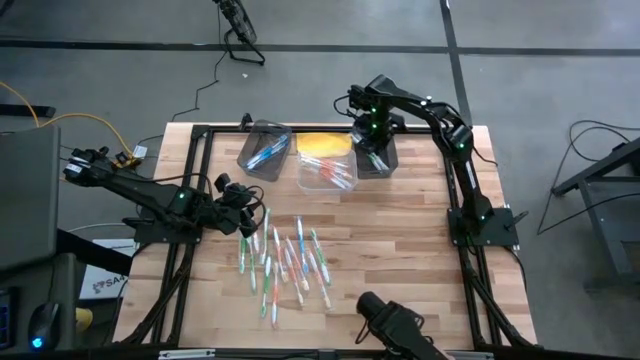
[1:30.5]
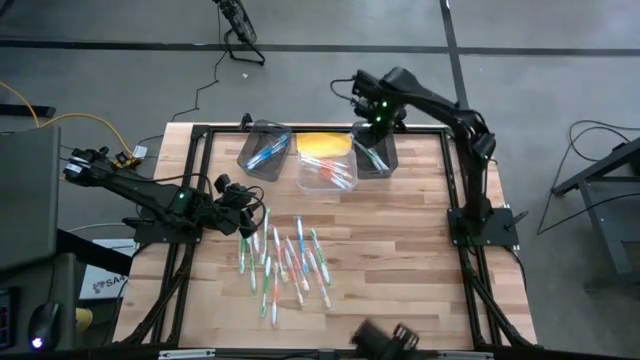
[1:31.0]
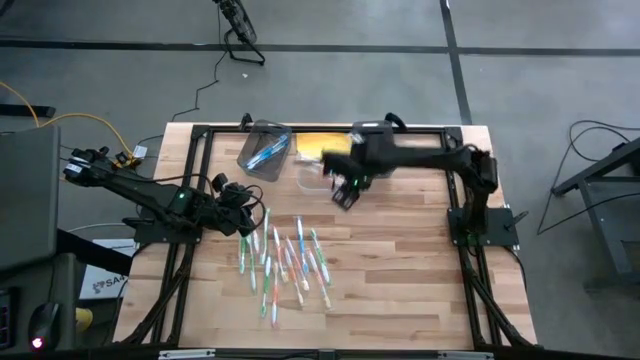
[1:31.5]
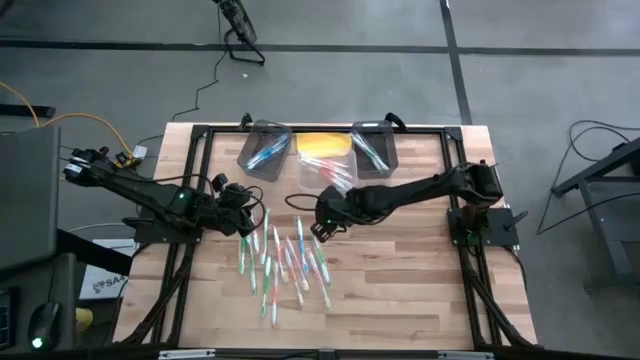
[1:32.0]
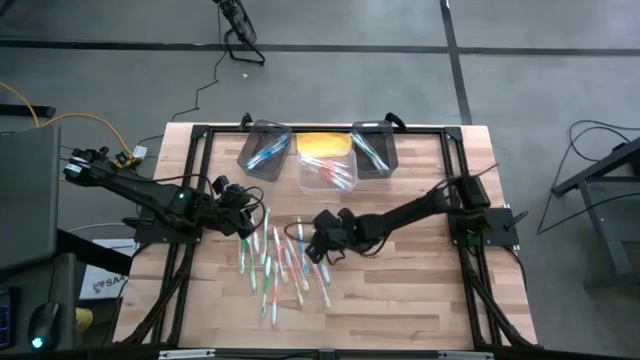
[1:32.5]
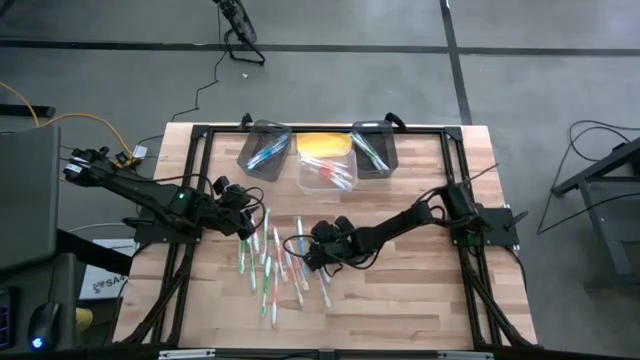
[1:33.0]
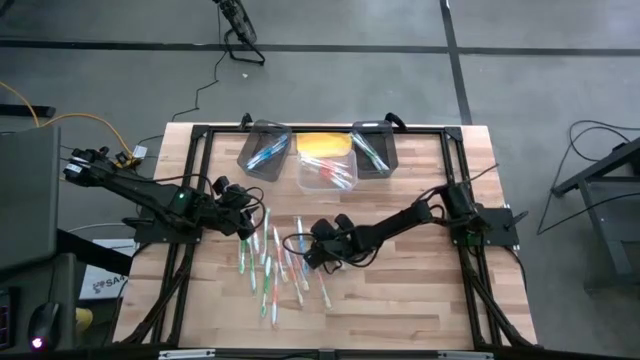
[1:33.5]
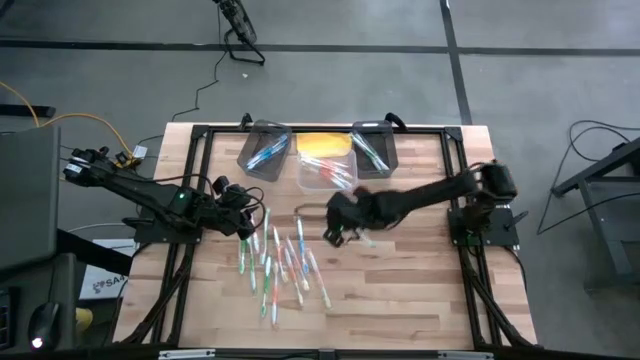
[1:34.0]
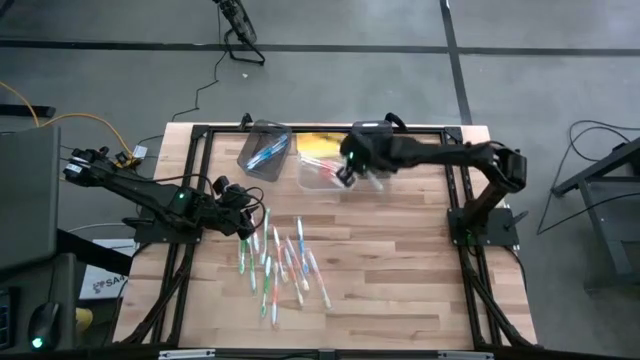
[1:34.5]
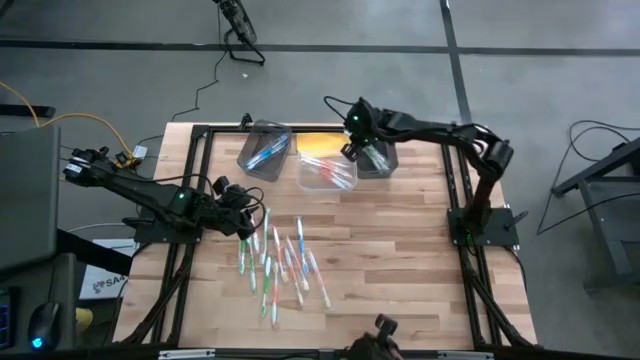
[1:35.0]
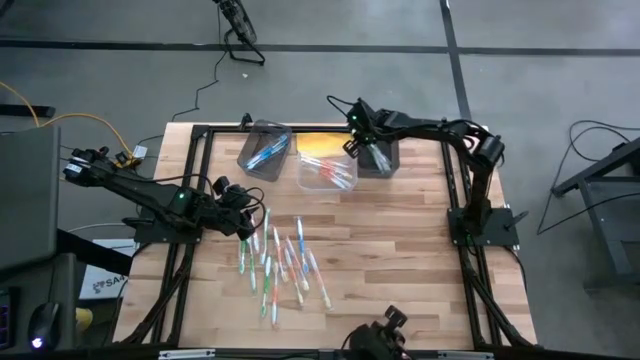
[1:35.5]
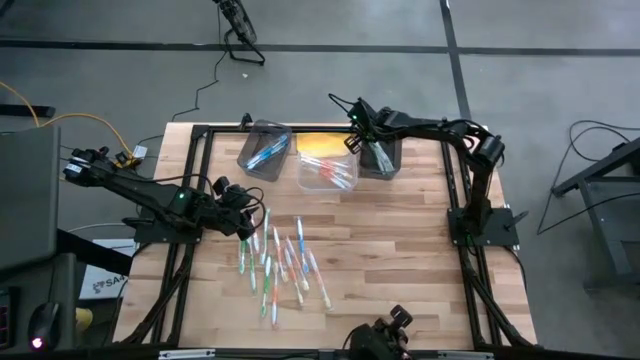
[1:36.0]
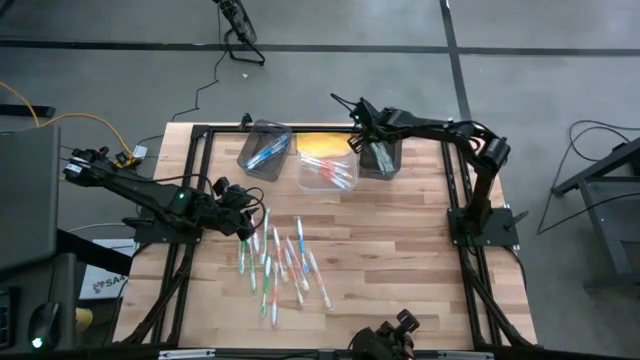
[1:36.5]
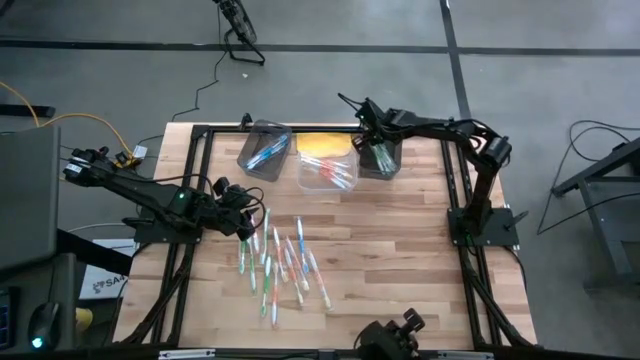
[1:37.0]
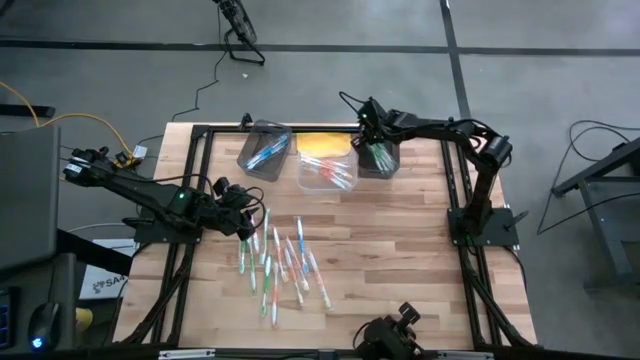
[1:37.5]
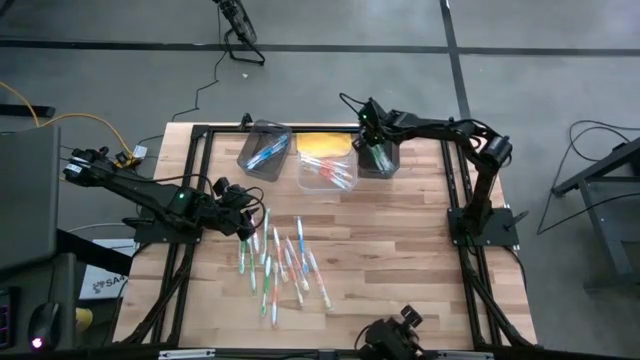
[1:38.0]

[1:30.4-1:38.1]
Task: Pick & Place Toothbrushes
Put the green toothbrush into the right black bin

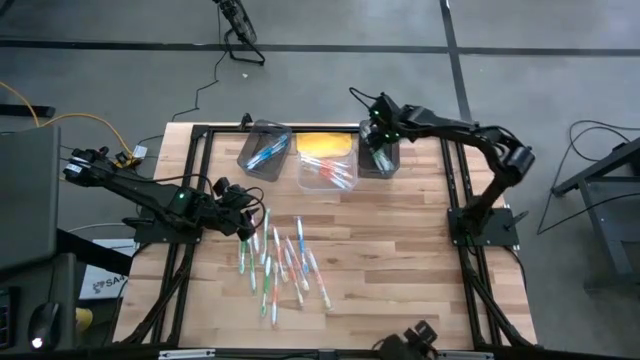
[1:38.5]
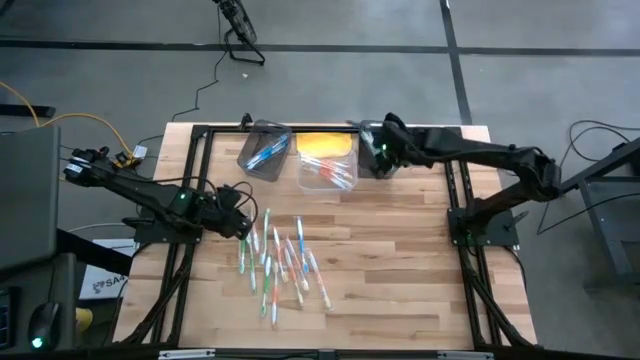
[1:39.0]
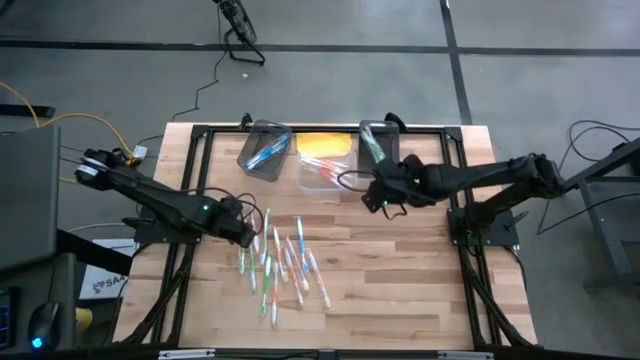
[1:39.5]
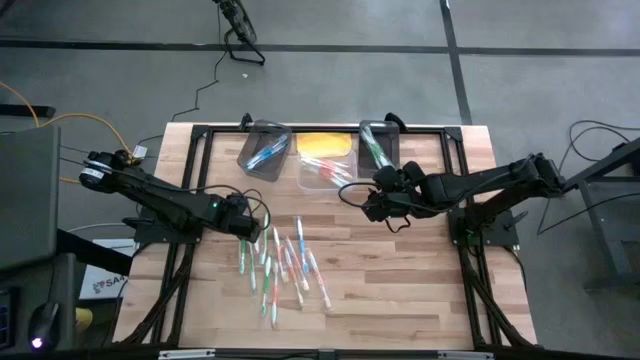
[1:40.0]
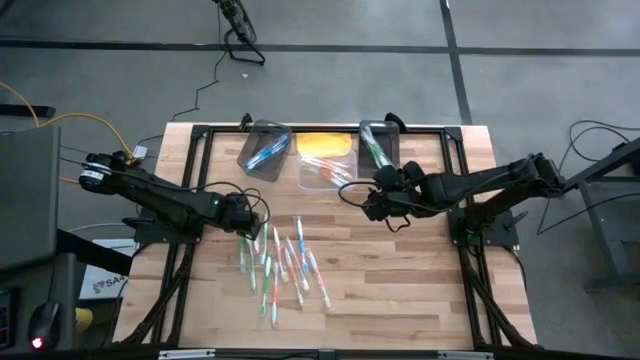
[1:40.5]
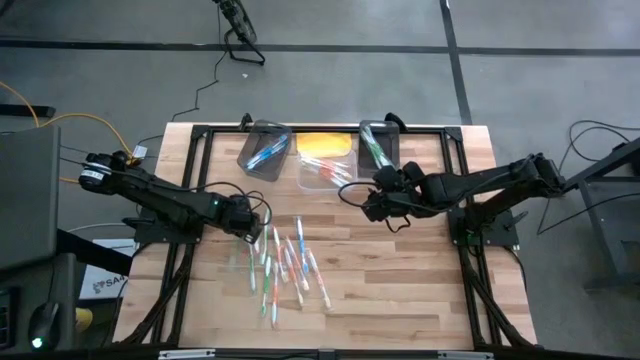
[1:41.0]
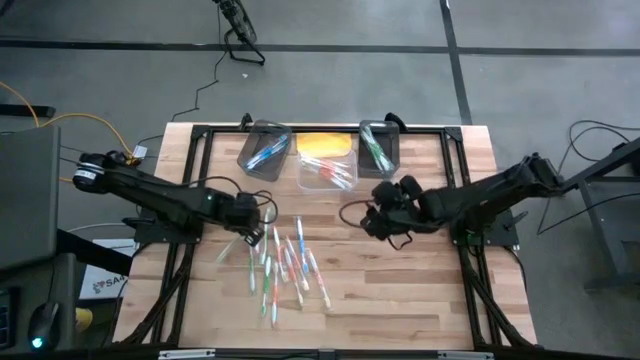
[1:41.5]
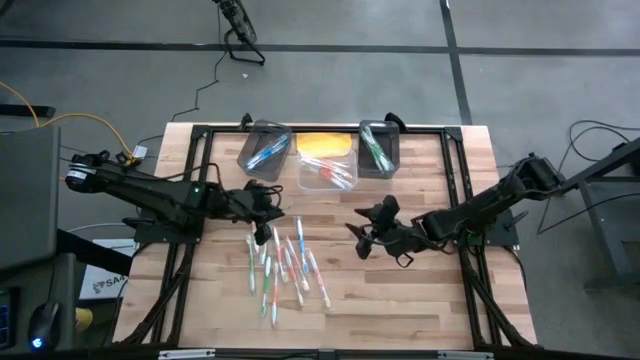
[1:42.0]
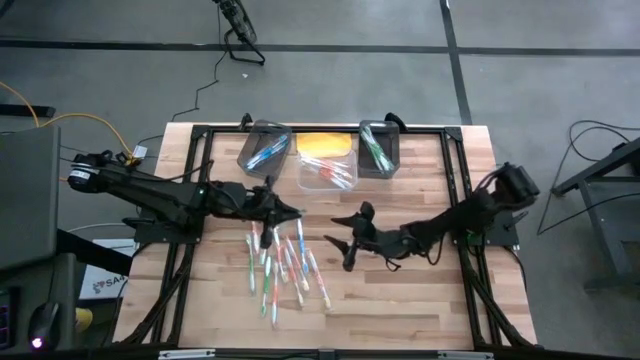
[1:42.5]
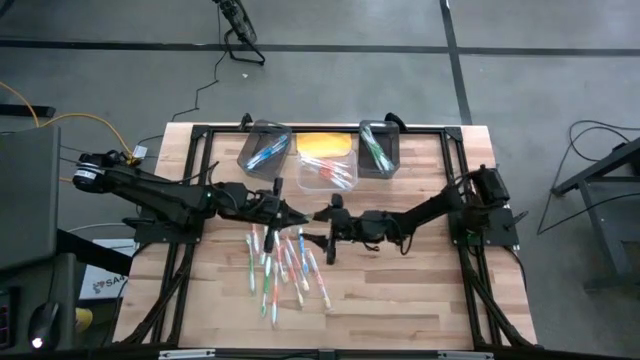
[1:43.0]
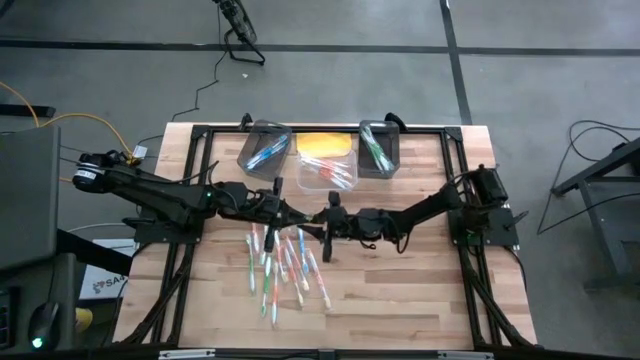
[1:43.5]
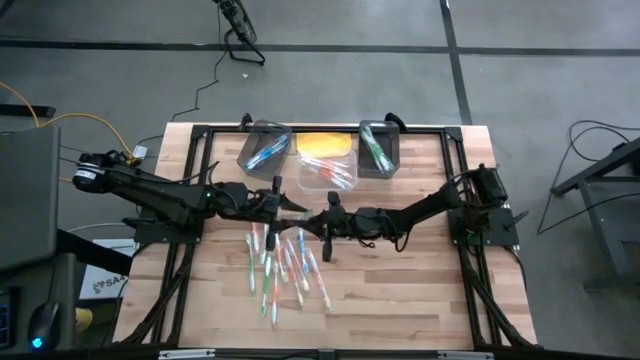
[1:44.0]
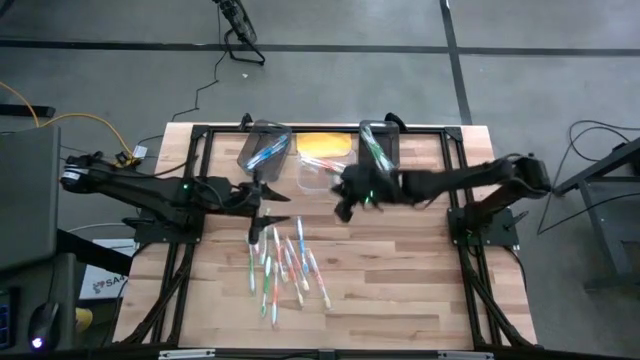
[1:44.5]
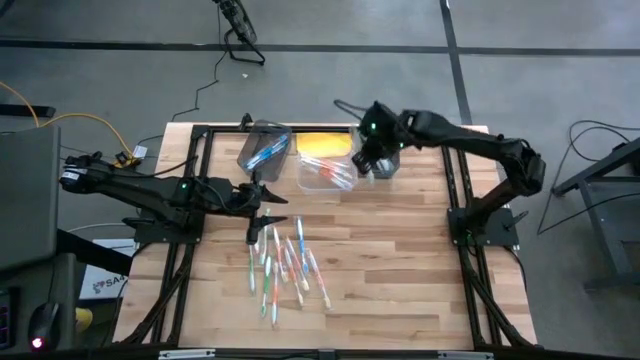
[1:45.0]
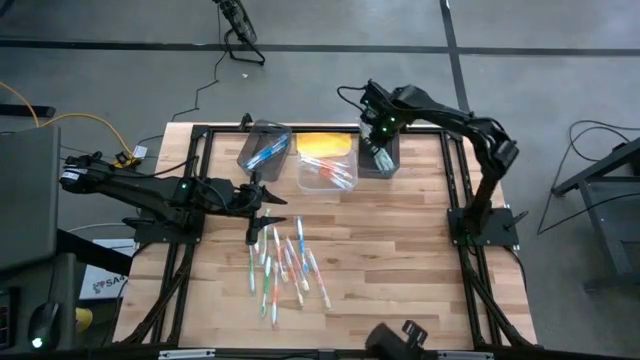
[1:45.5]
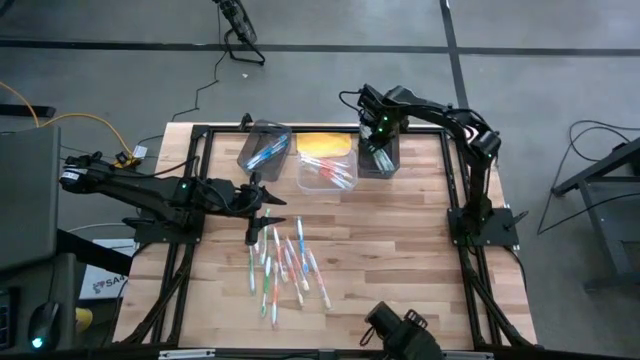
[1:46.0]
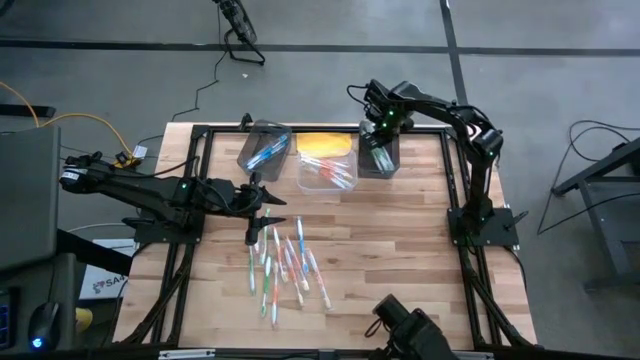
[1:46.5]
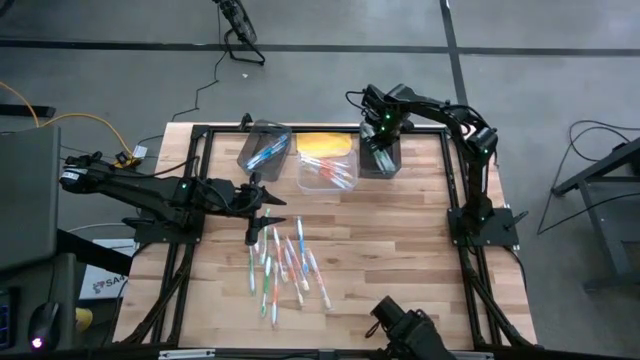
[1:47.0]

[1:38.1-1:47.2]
Put the green toothbrush into the right black bin

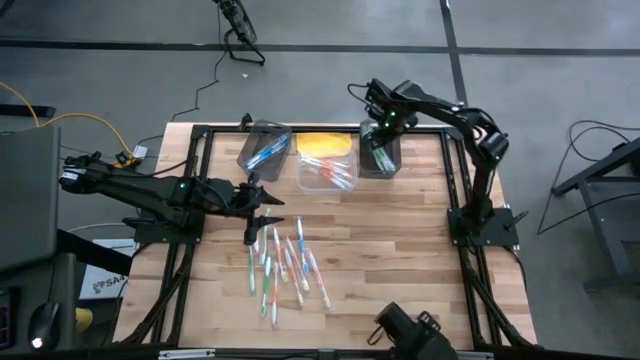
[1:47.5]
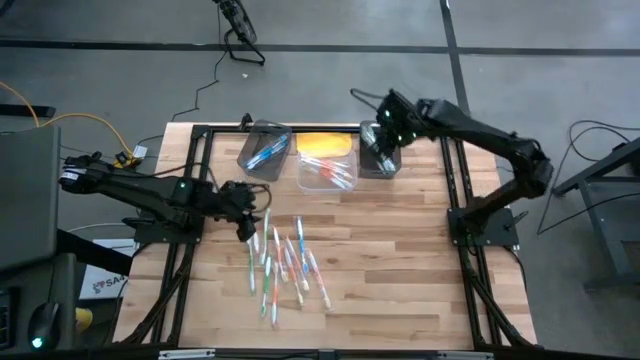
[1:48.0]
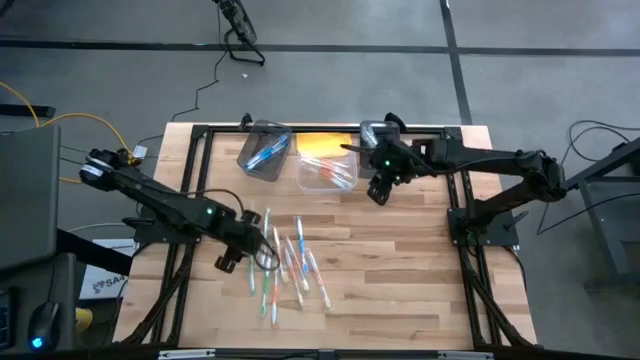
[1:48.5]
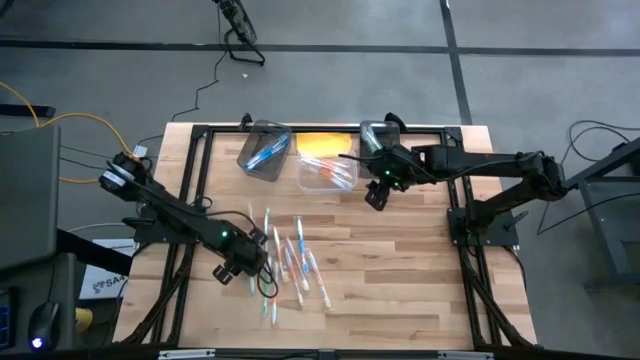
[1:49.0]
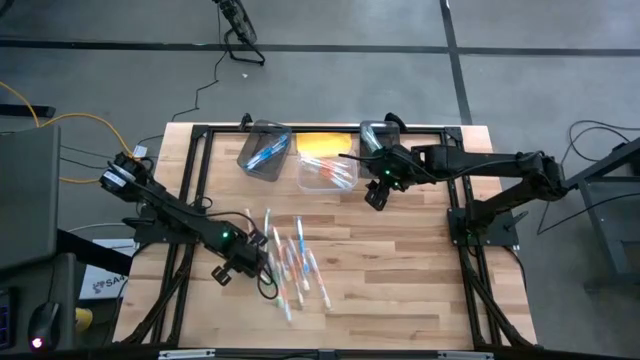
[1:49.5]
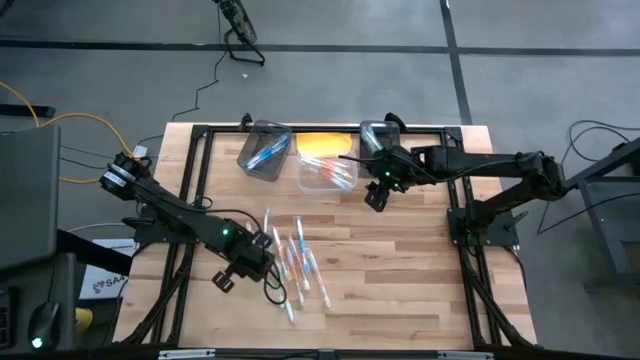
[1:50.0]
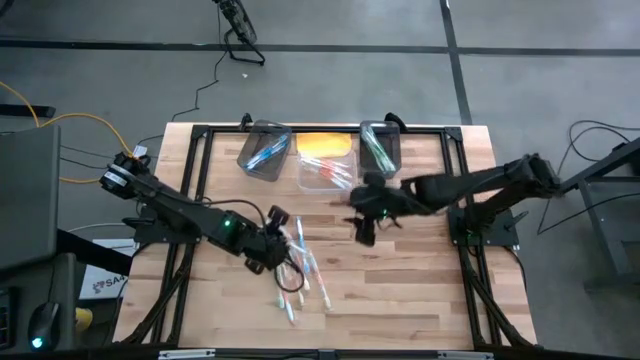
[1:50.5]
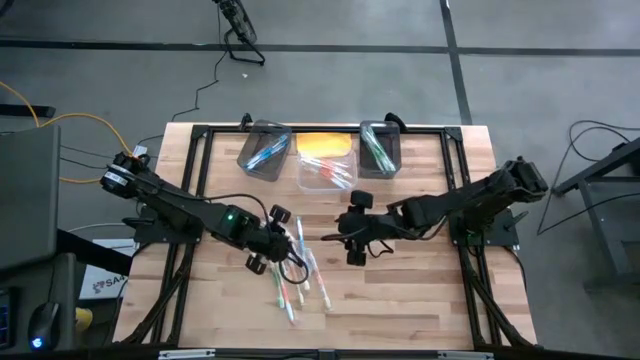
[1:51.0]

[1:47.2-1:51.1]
Put the green toothbrush into the right black bin

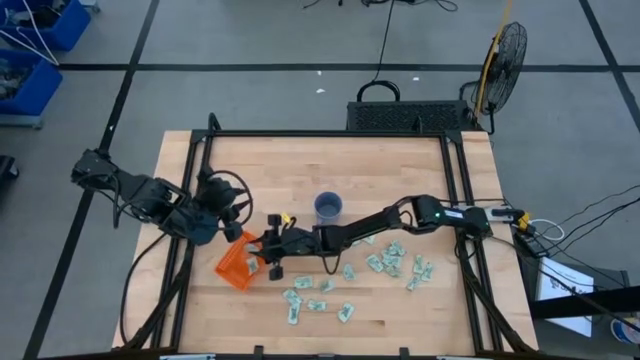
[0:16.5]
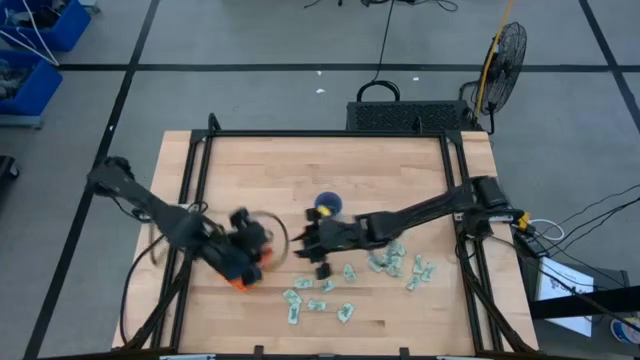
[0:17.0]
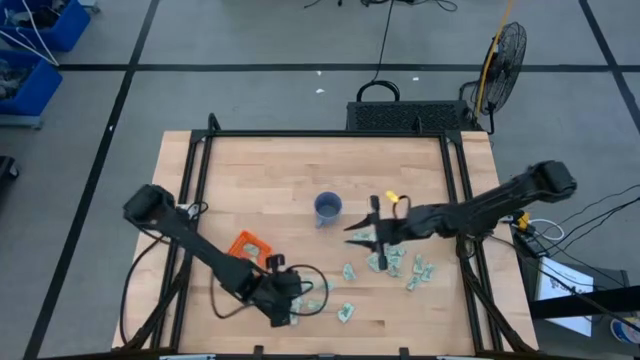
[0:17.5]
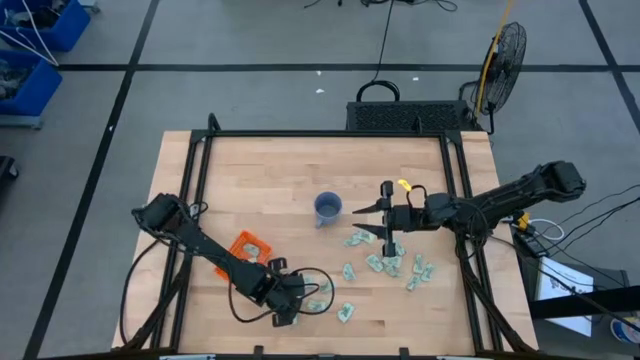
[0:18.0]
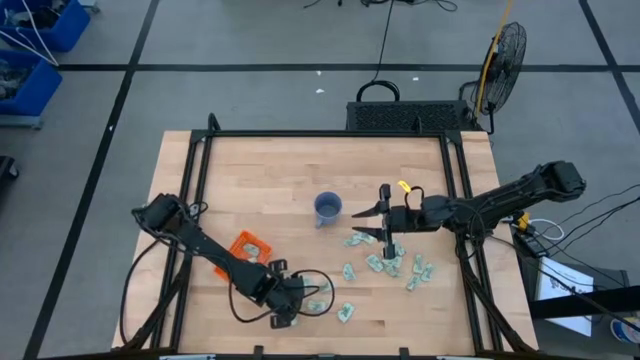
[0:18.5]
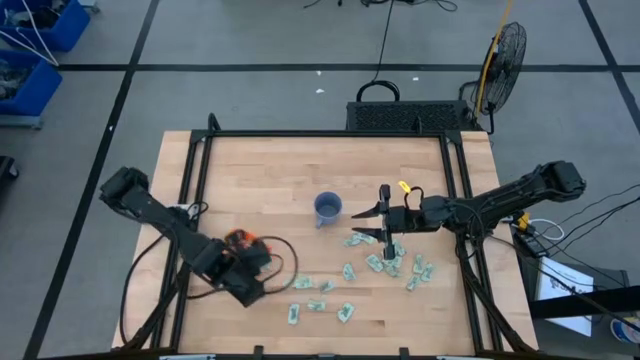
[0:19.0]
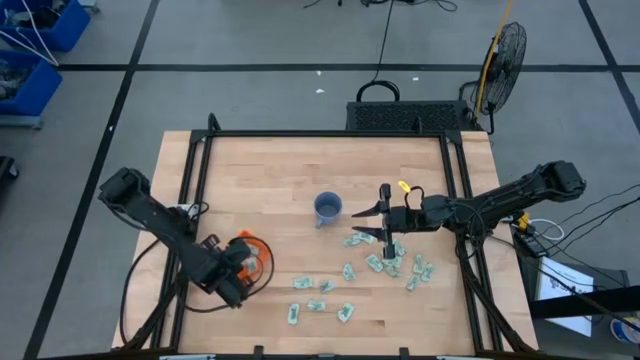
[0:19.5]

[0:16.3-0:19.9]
Task: Pick and place Stevia / Truvia into bins
Put the green stevia packet into the orange basket
